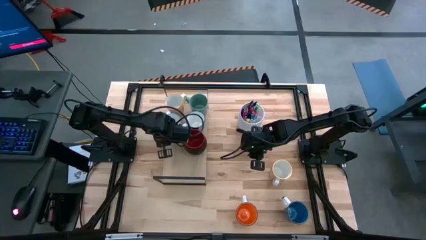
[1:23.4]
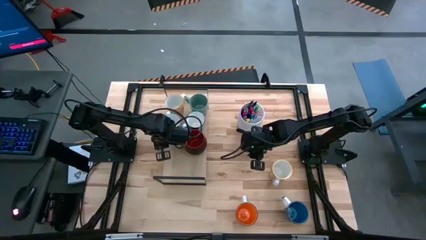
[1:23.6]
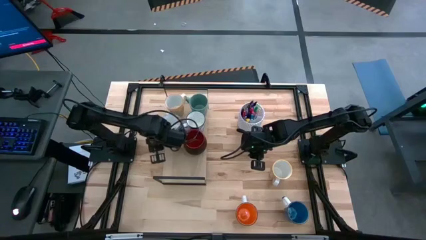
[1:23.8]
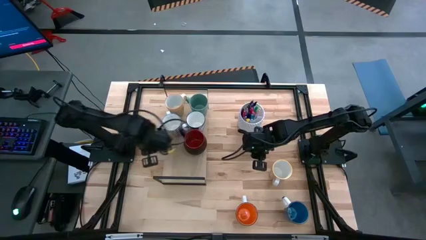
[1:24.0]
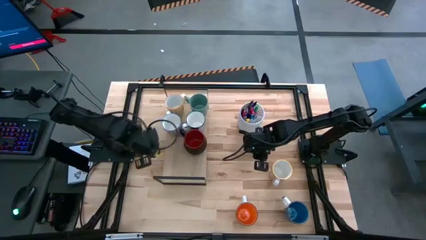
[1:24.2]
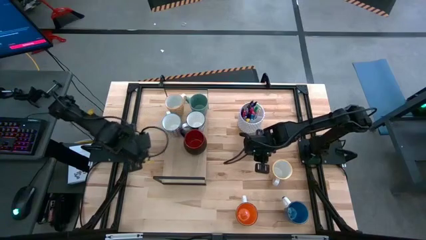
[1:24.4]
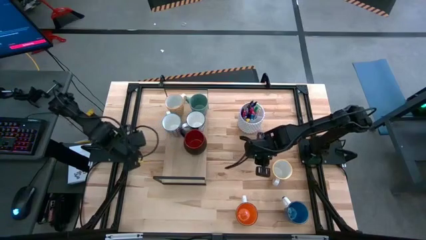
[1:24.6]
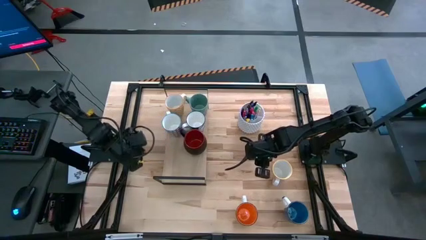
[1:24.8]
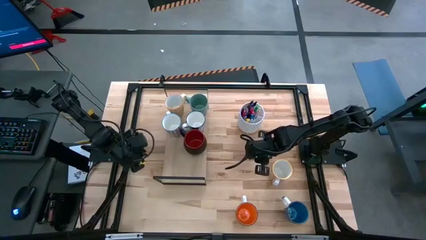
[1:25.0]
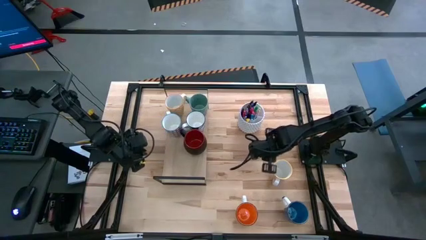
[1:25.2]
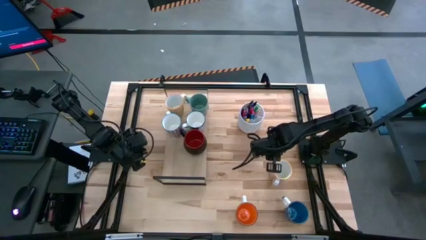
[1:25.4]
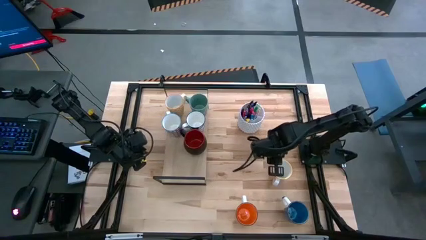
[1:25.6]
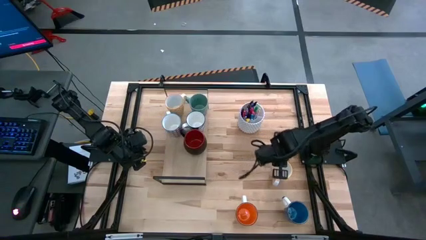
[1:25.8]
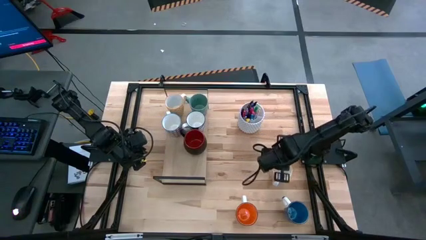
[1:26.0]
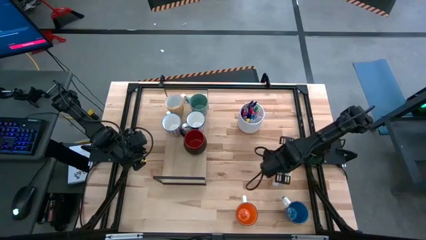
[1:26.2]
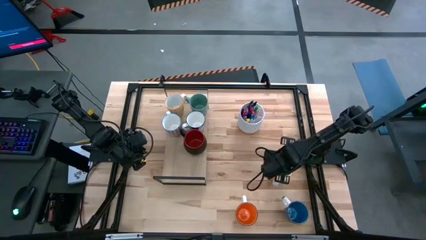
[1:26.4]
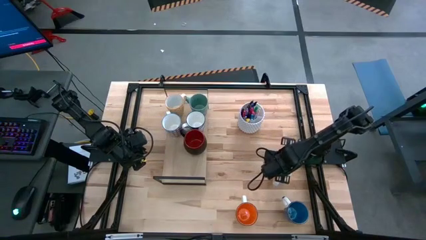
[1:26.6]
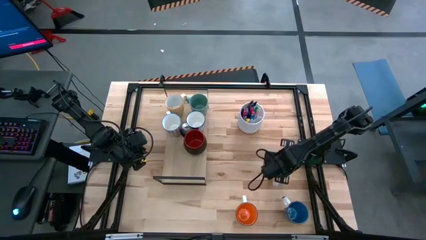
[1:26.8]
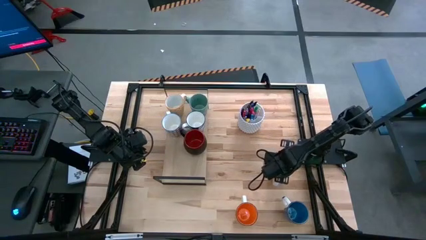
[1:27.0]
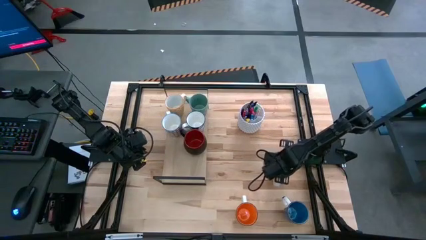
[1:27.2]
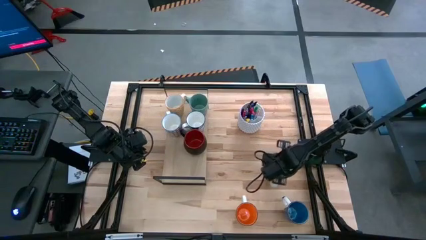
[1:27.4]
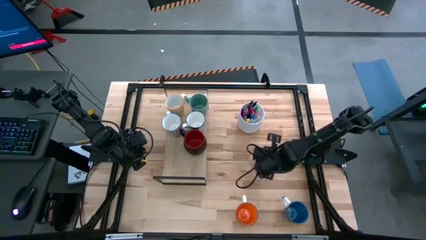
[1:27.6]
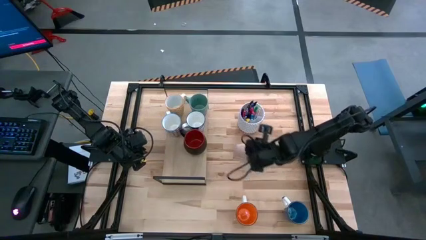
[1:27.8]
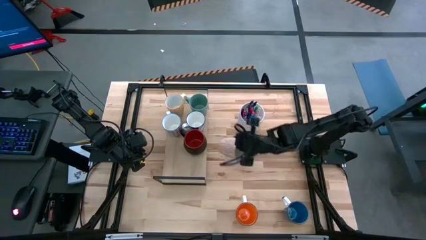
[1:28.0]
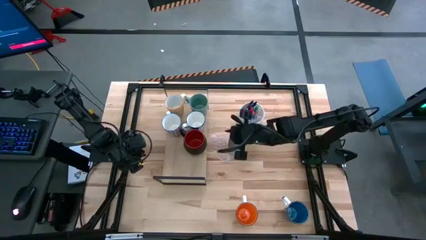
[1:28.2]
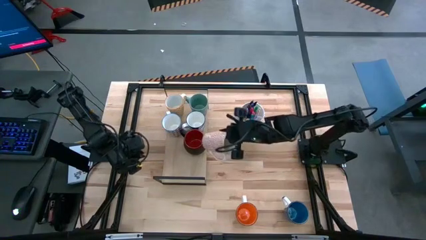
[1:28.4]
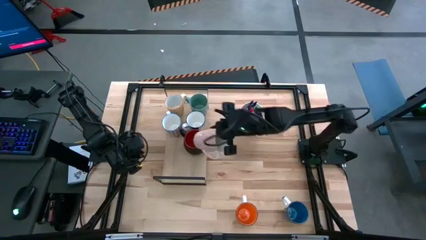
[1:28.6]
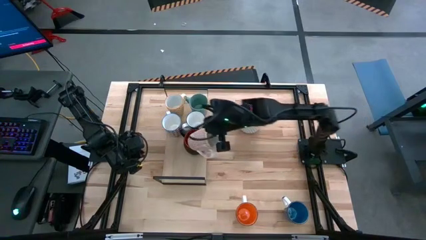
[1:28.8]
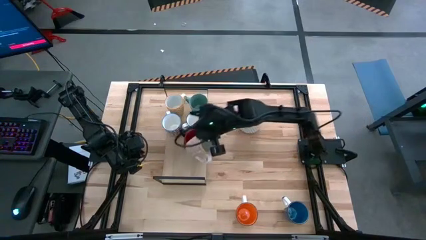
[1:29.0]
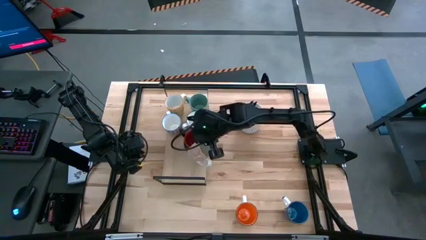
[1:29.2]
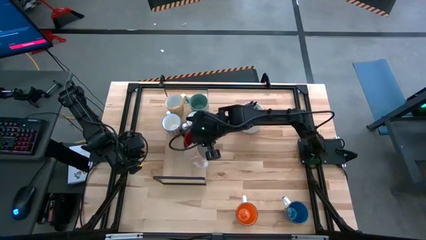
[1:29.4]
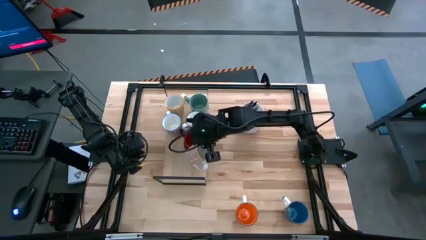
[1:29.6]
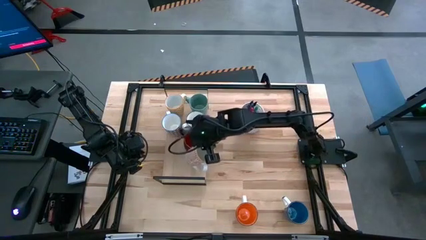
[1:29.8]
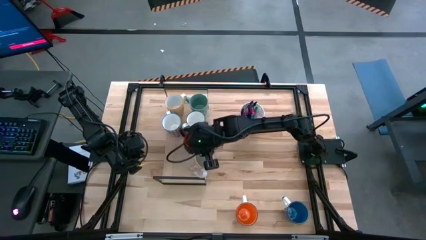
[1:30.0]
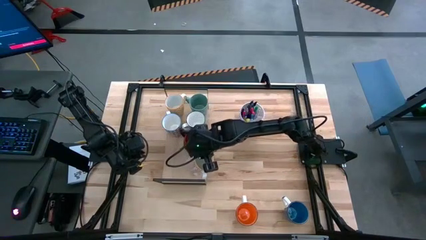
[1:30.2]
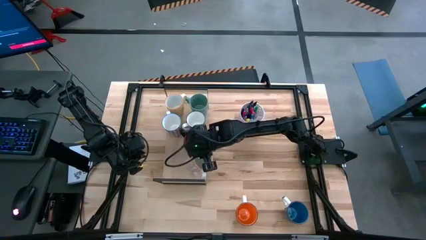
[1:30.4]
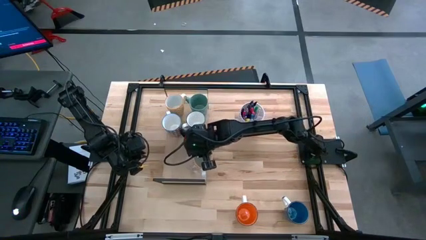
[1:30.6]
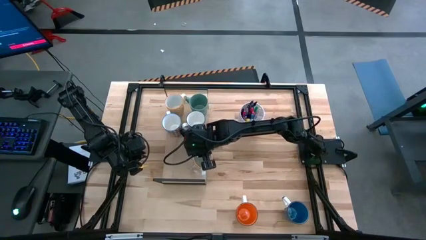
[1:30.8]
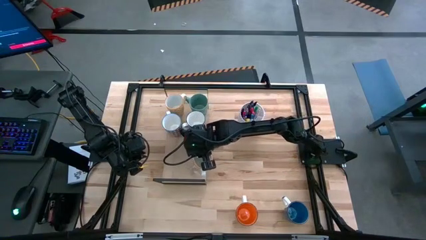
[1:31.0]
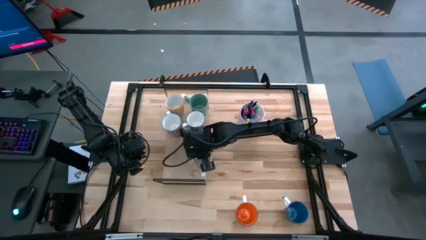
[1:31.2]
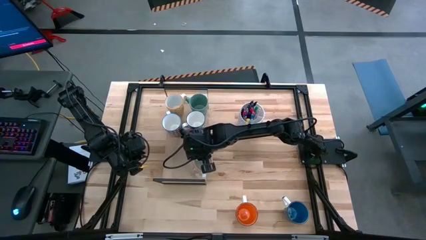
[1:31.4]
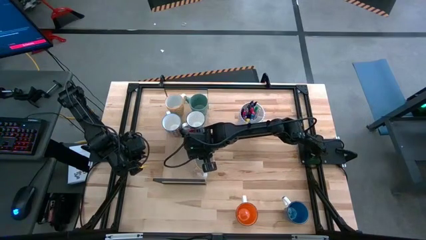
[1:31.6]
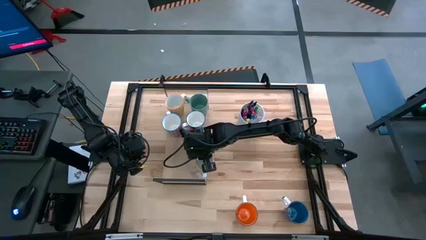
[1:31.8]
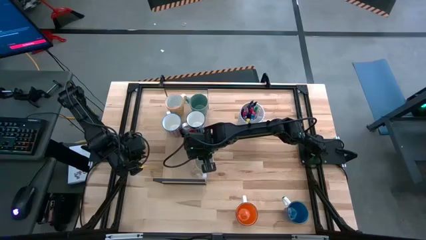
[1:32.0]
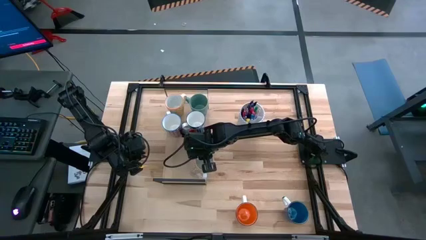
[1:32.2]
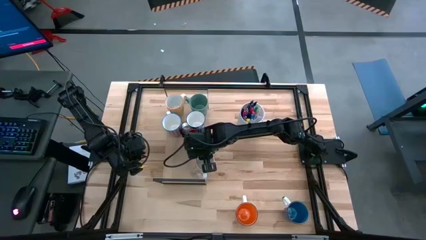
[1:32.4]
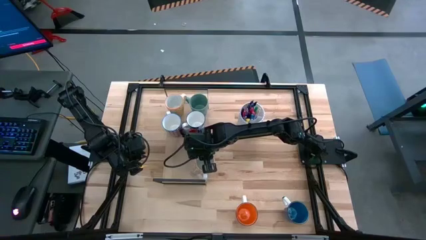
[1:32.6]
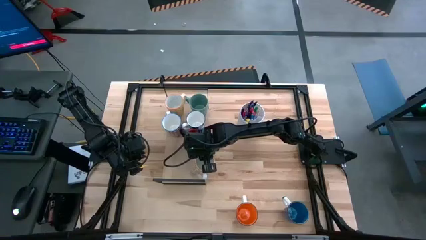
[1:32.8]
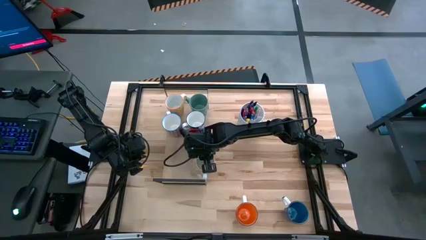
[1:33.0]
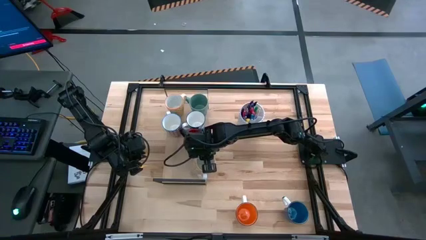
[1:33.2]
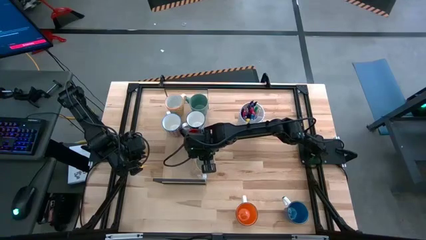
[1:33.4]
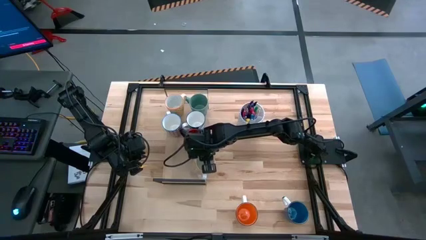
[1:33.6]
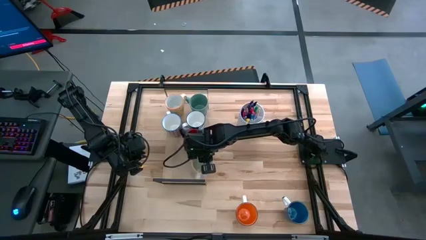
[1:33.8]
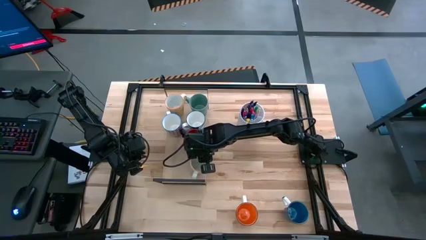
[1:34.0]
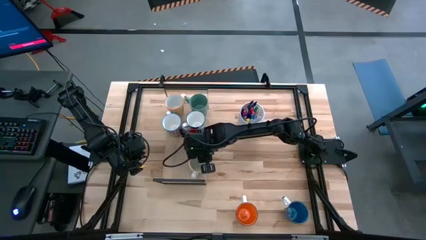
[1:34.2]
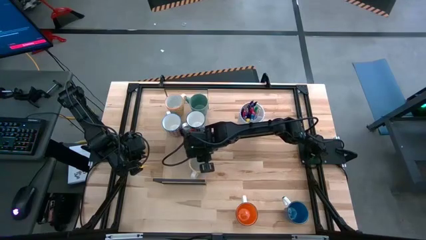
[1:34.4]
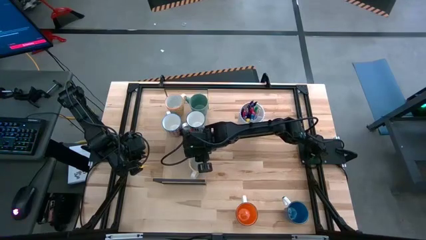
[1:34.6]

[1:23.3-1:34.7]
Task: Place coffee mugs
Put the orange patterned mug on the shelf
